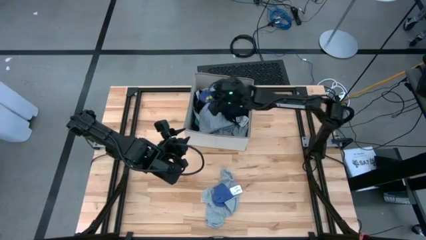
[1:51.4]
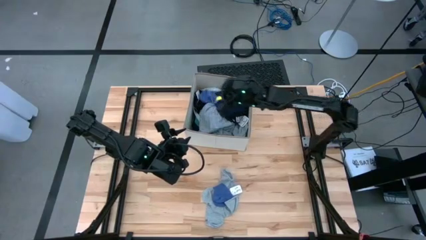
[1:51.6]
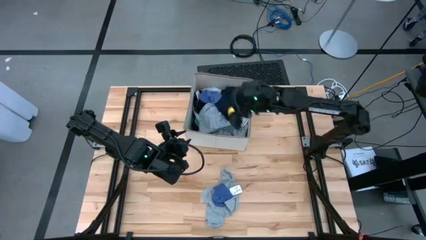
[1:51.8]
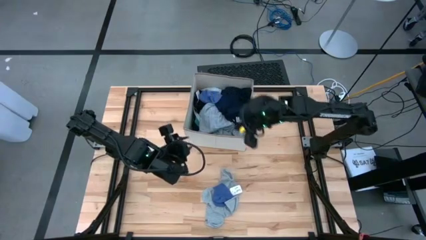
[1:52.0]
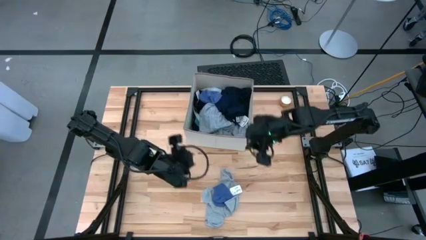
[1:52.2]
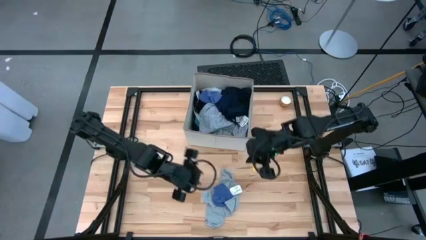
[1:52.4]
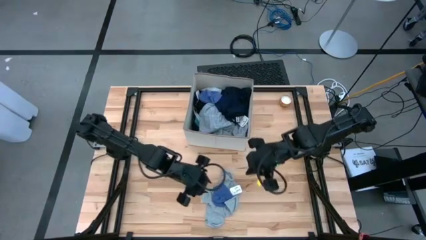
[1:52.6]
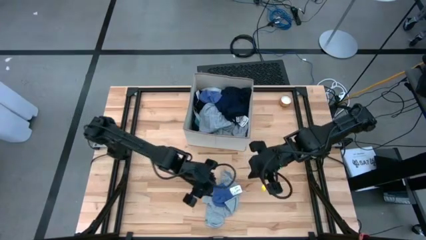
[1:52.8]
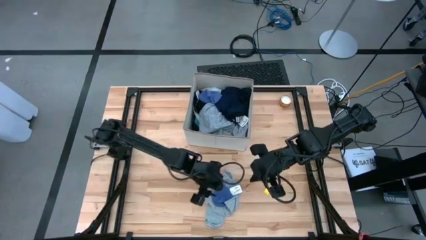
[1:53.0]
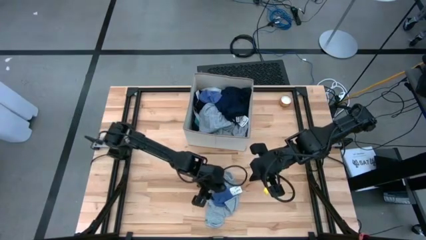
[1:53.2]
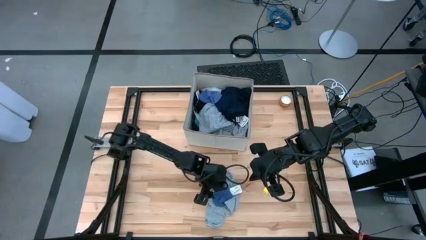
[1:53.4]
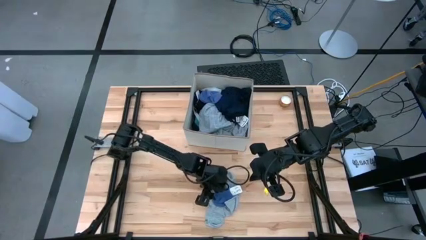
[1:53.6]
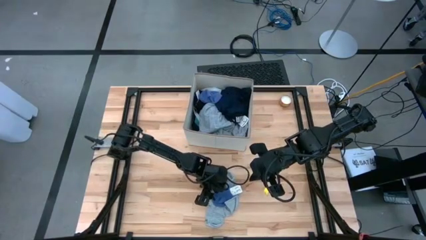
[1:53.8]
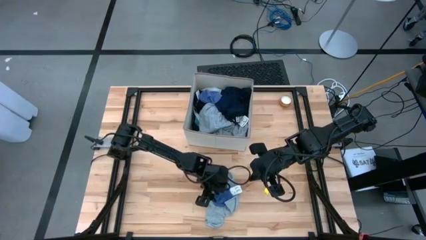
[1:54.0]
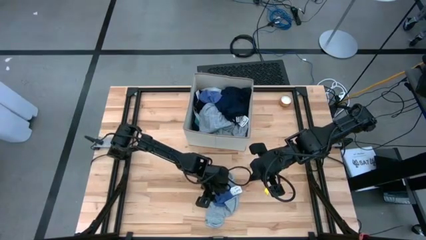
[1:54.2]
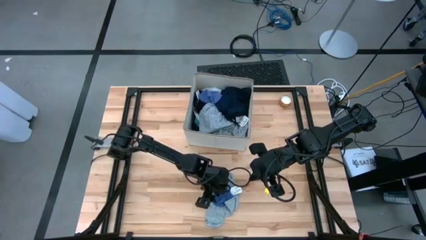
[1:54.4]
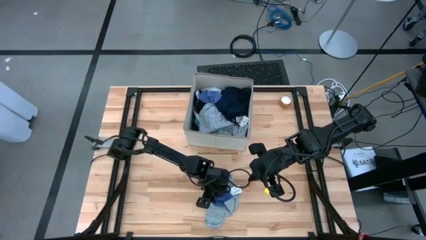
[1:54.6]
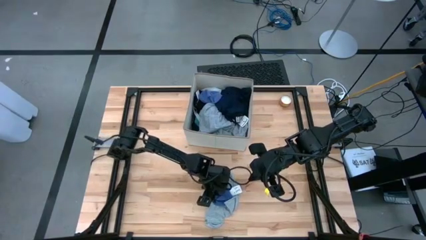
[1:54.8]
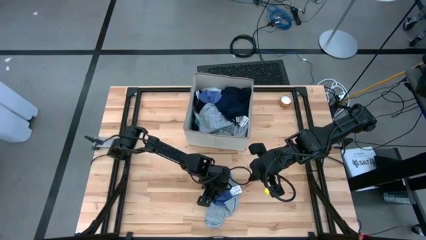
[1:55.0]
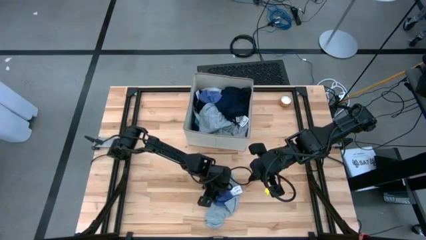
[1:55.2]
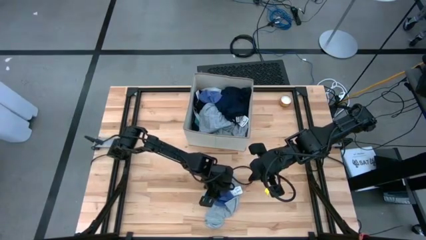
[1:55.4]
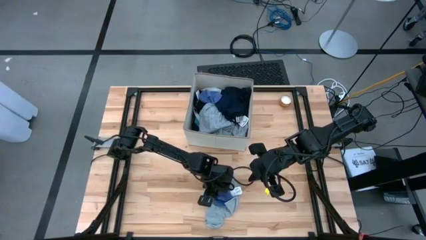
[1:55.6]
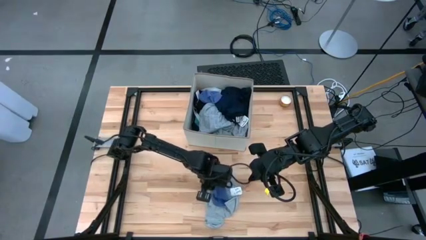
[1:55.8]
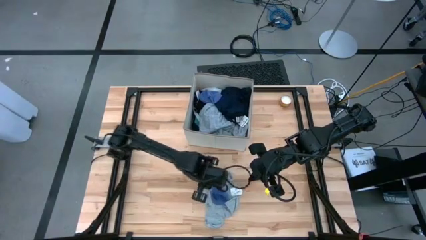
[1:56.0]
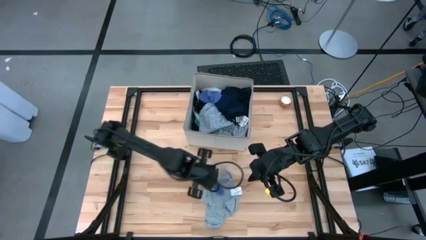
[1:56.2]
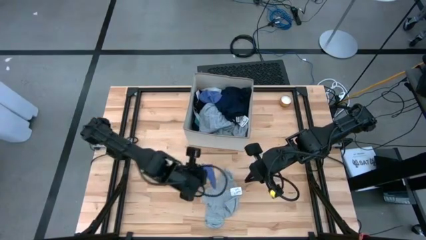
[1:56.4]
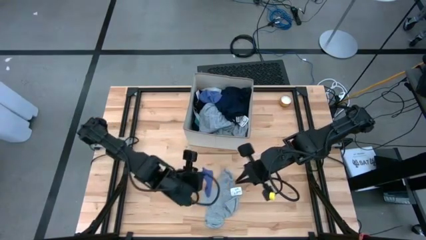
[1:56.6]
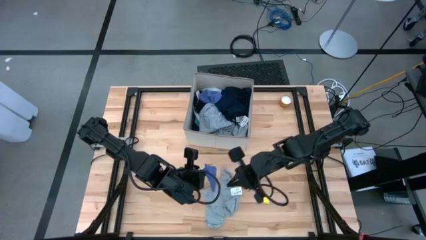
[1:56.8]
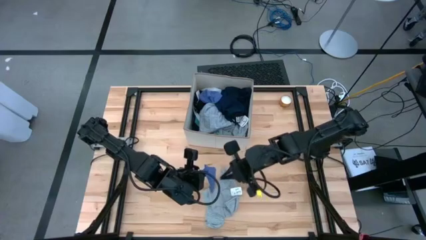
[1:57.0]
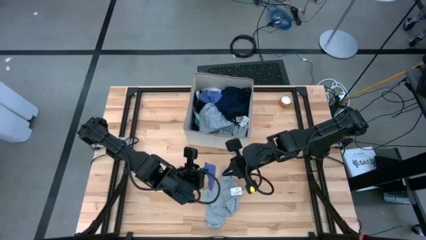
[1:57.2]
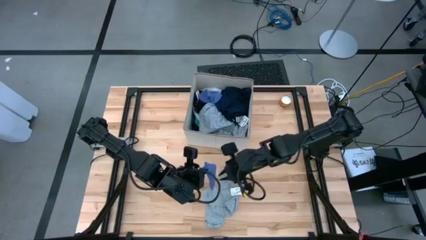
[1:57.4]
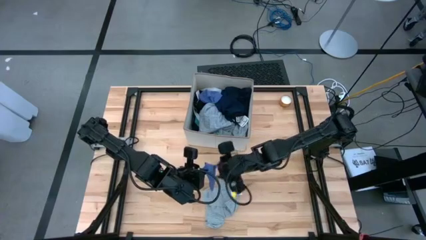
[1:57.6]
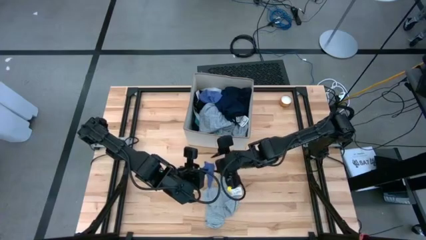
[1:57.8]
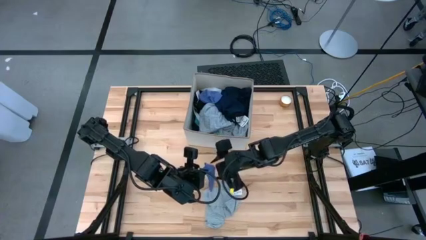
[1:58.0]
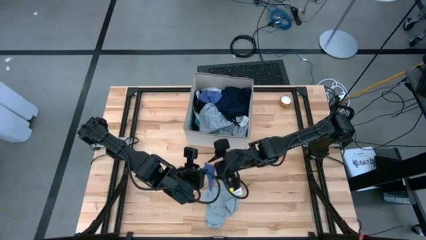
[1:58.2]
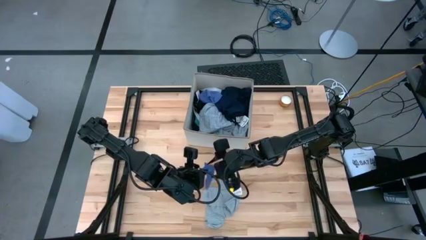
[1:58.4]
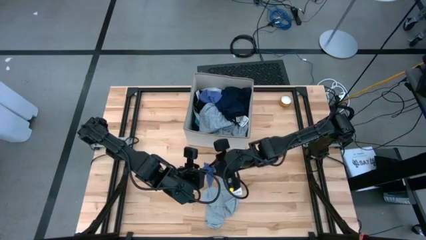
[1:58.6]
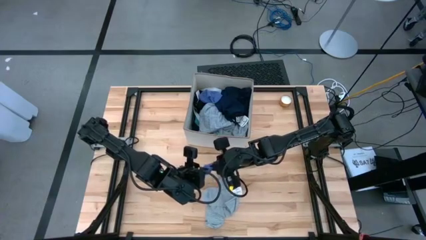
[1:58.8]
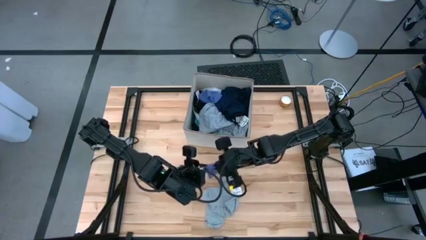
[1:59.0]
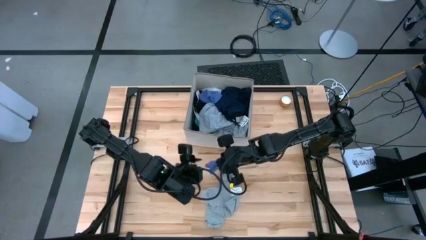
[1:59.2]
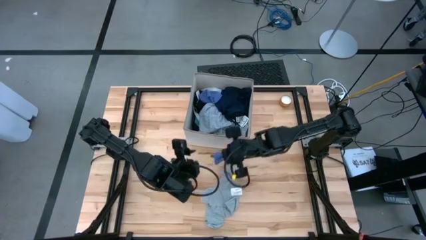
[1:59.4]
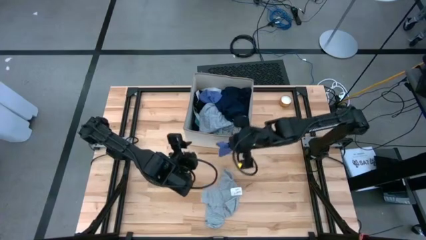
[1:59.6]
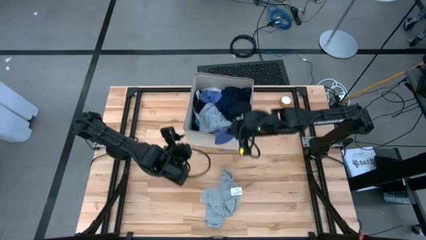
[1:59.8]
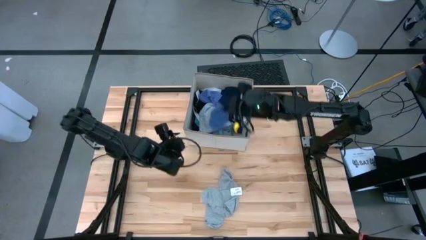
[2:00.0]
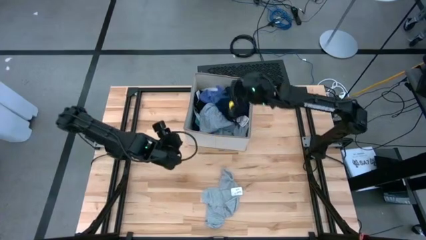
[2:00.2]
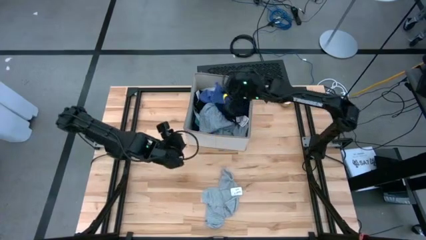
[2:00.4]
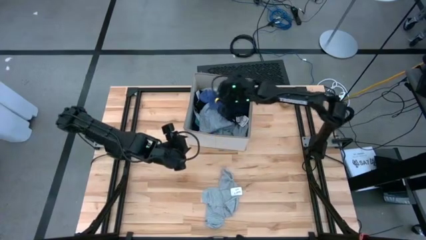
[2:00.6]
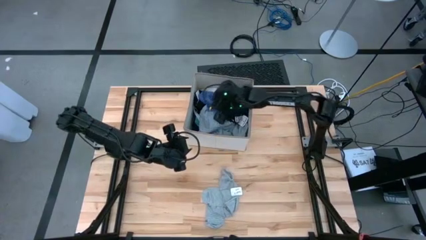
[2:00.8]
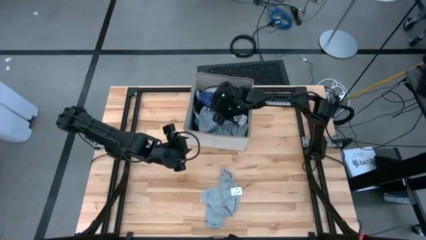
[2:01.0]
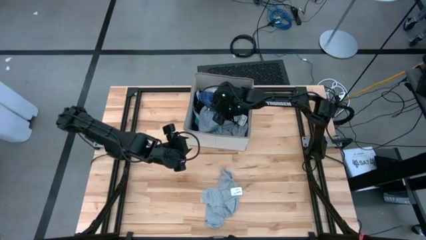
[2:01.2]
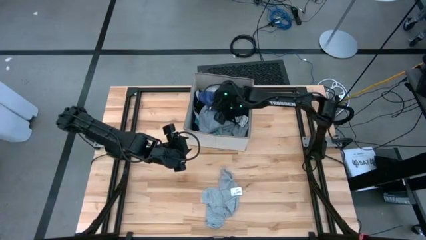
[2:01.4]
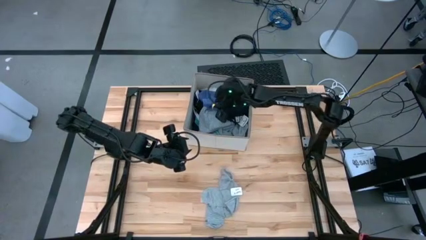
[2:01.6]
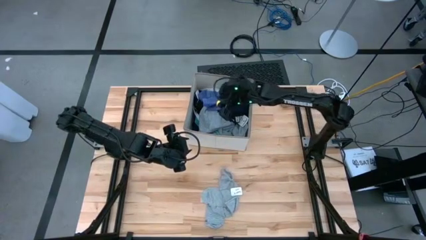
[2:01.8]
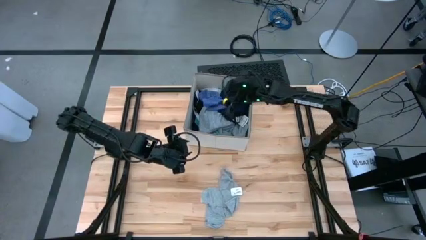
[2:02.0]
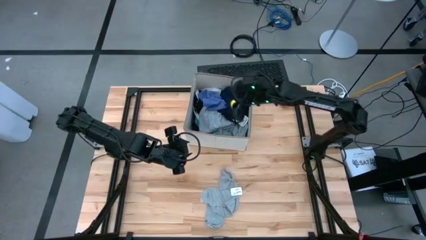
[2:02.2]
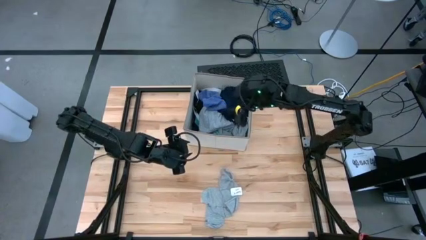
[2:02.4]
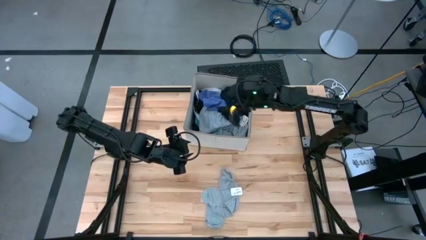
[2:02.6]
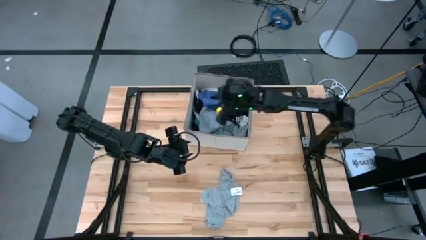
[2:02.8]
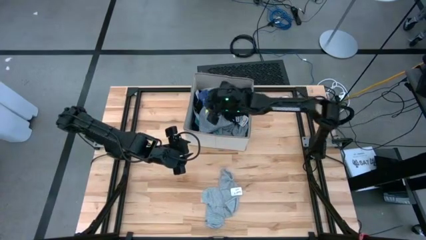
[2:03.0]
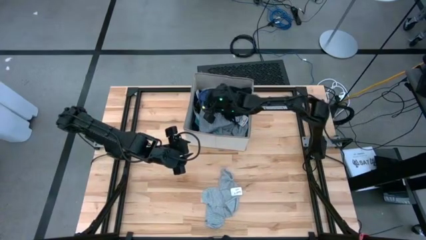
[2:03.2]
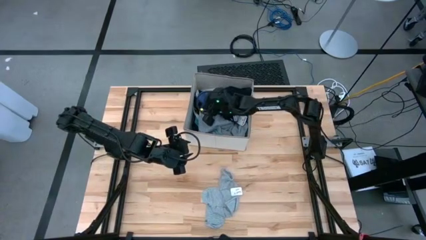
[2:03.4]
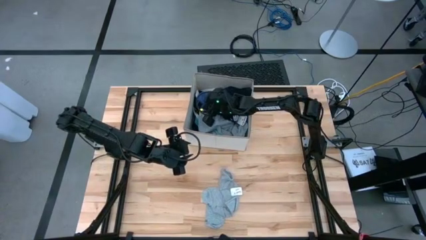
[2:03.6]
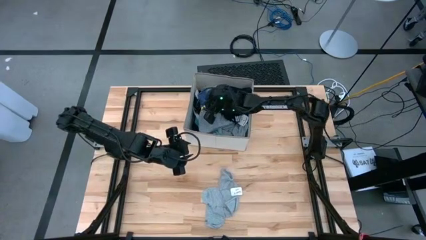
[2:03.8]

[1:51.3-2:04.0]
Task: Sort clothes
Put the blue sock into the laundry bin

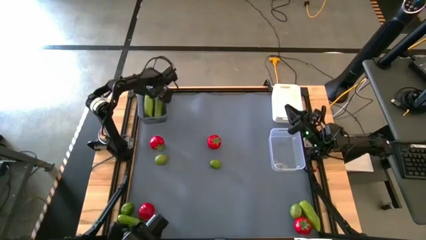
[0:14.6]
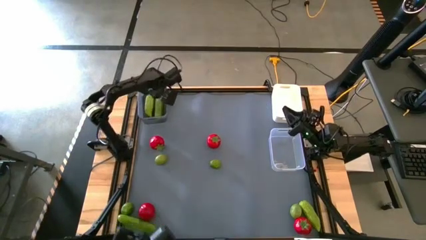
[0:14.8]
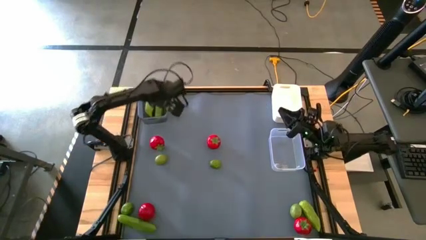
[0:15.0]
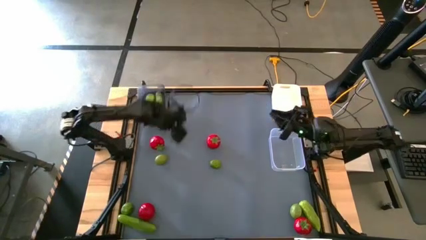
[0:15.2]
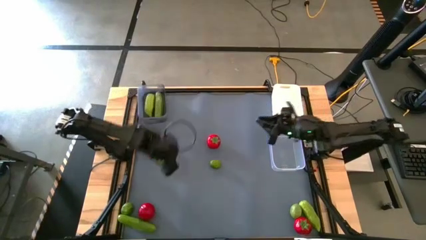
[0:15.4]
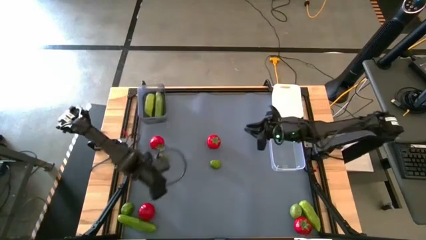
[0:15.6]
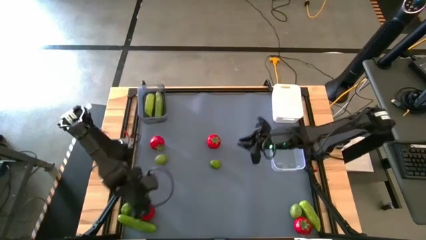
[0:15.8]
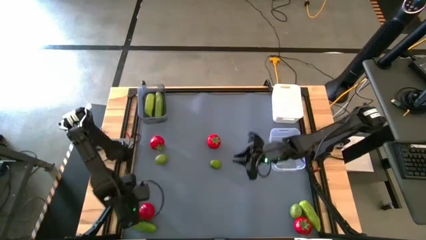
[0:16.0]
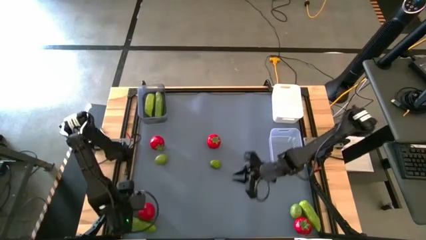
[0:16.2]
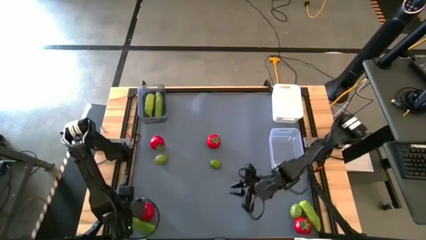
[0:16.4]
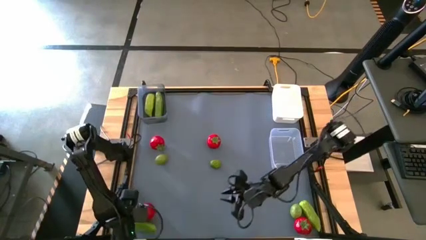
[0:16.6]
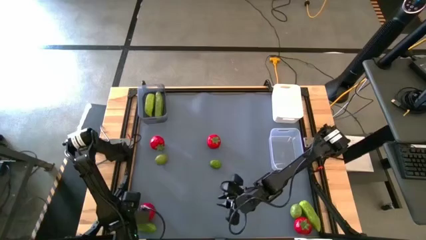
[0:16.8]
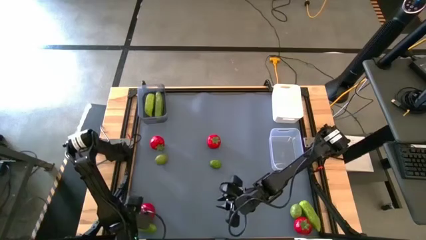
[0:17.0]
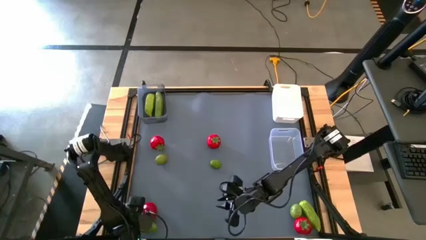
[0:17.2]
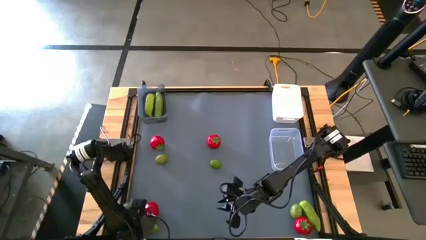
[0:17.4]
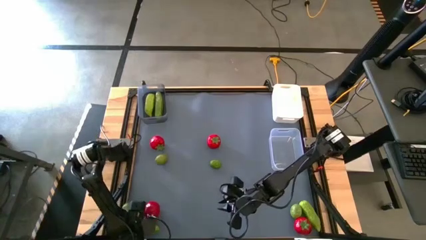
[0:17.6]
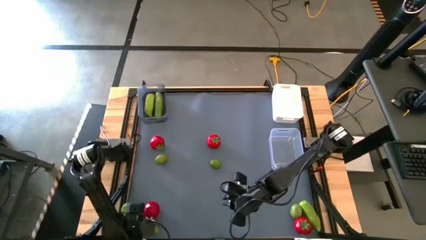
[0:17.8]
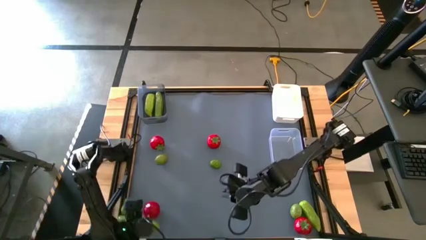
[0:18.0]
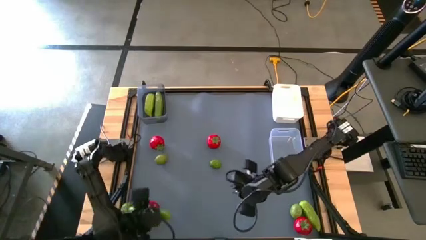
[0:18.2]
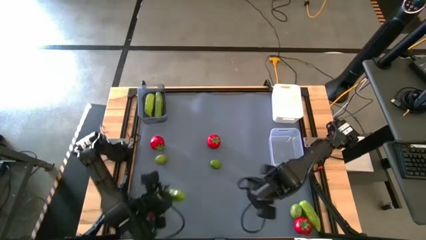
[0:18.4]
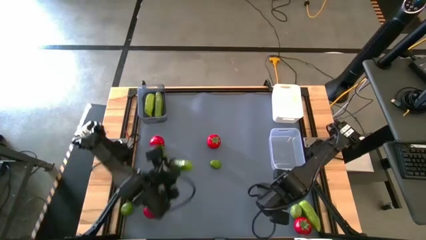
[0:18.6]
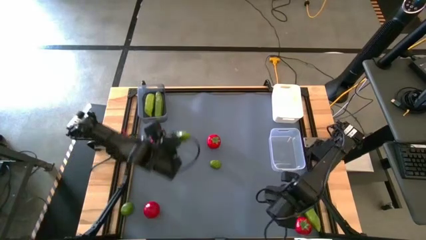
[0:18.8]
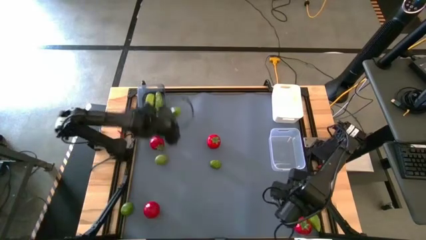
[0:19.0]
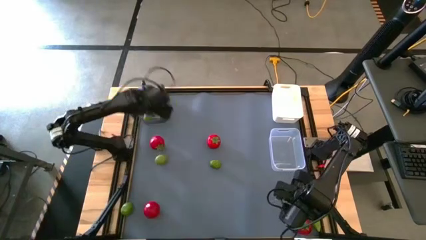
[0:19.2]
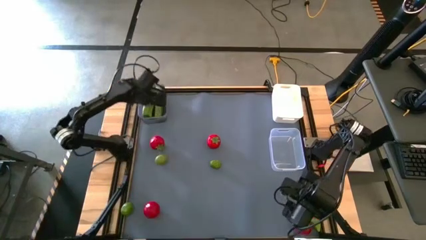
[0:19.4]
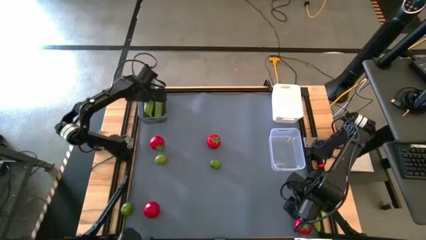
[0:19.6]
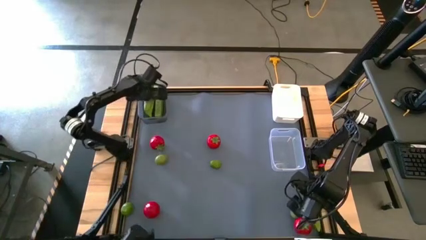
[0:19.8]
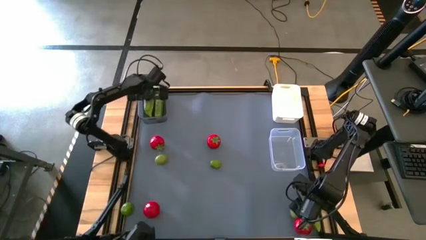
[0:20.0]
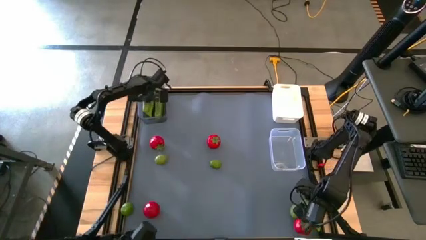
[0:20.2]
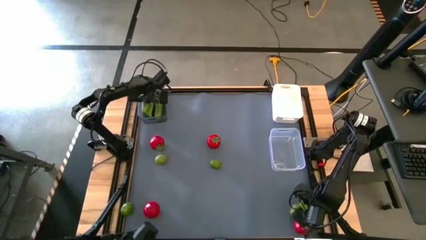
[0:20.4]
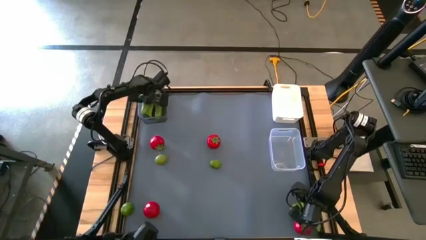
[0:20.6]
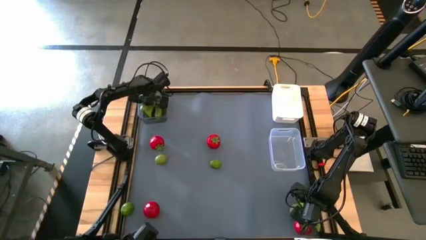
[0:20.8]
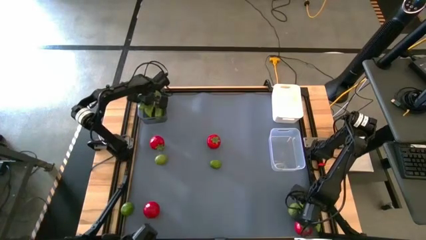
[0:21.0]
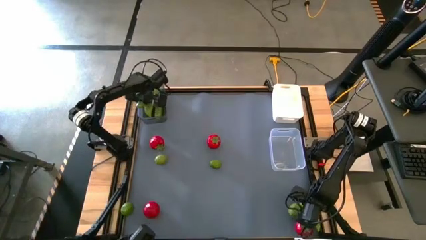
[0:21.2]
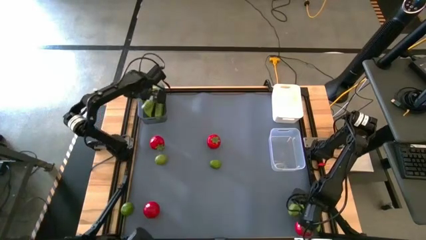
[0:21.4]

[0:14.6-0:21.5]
Task: Sort produce into baskets
Put the cucumber into the black bin
